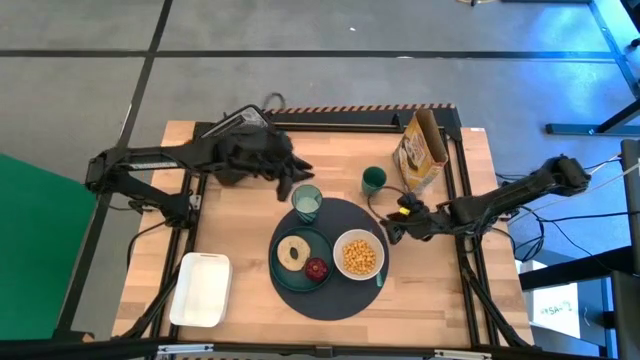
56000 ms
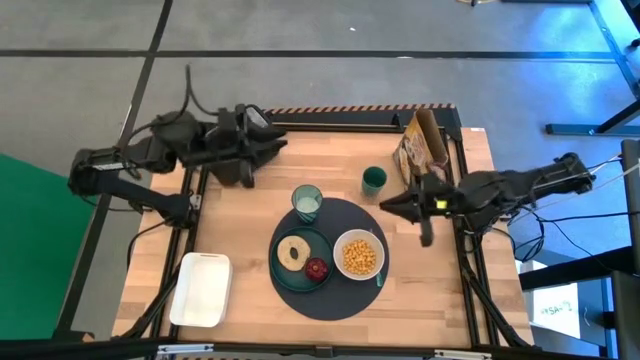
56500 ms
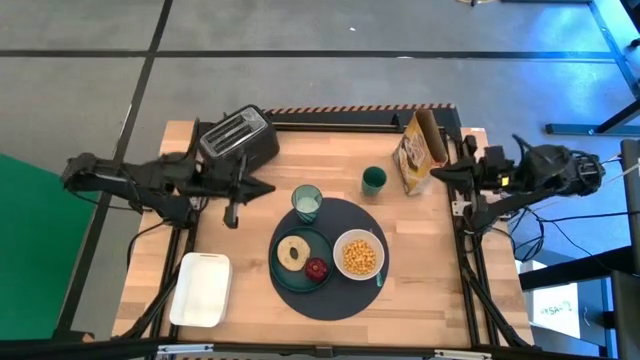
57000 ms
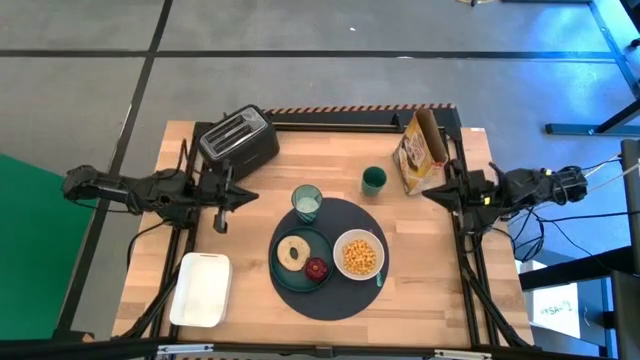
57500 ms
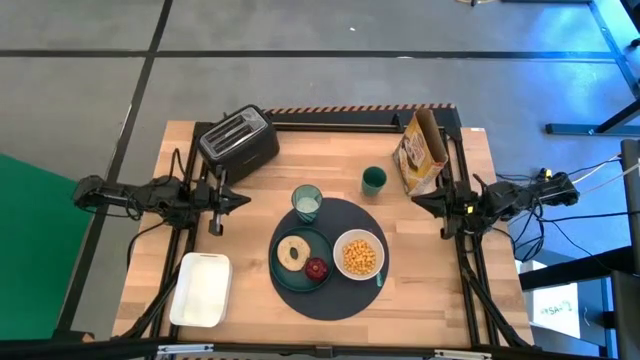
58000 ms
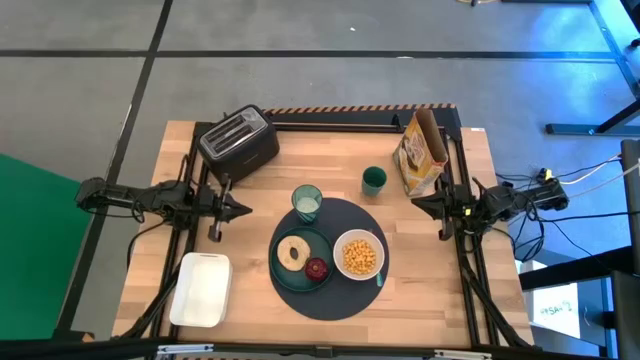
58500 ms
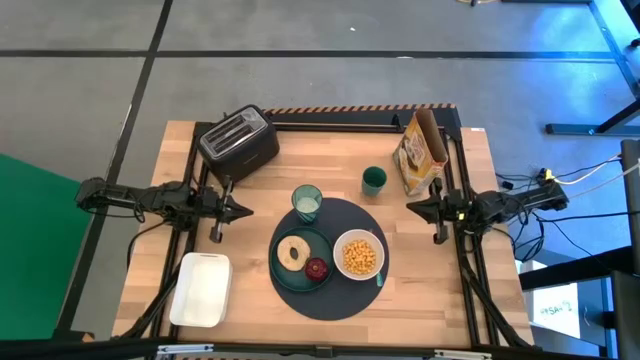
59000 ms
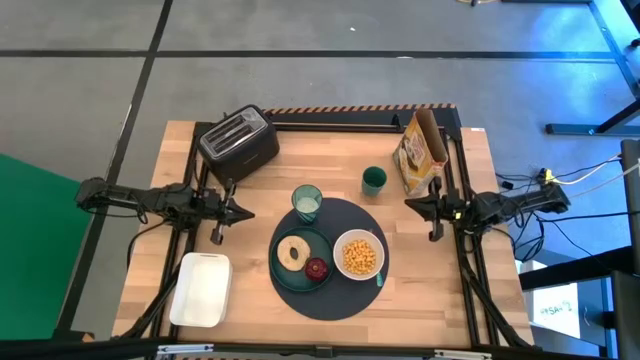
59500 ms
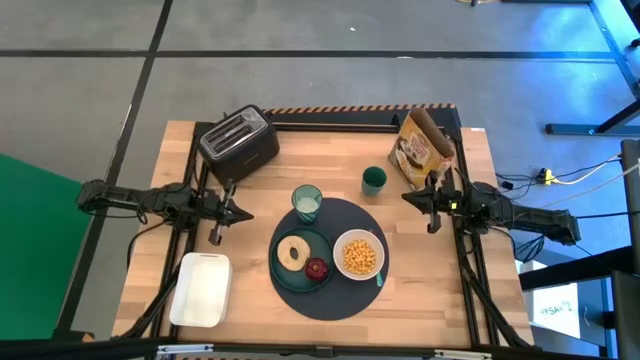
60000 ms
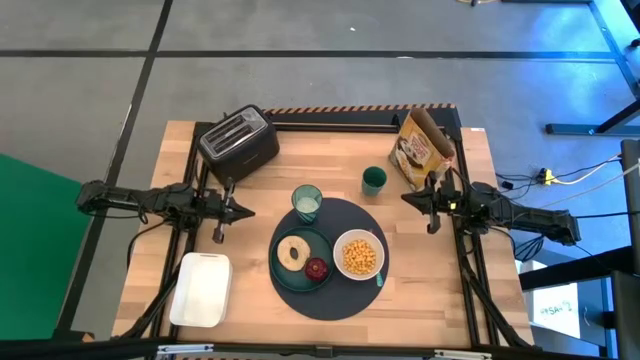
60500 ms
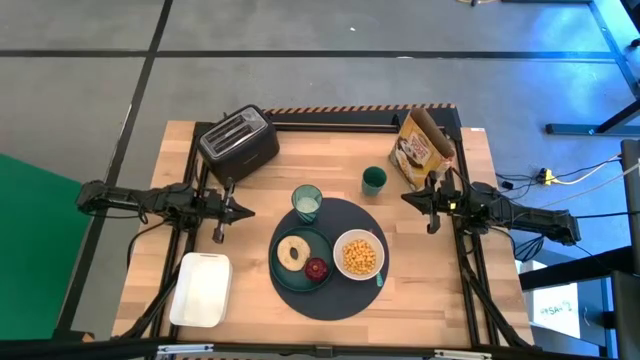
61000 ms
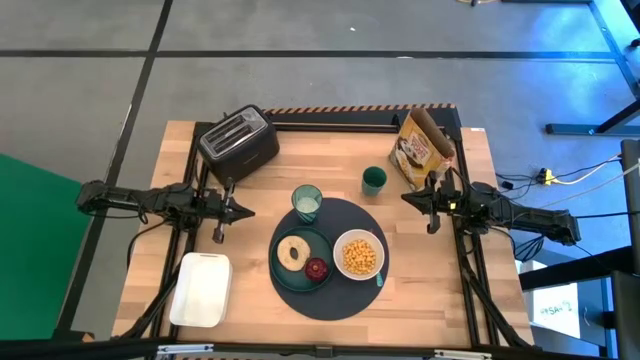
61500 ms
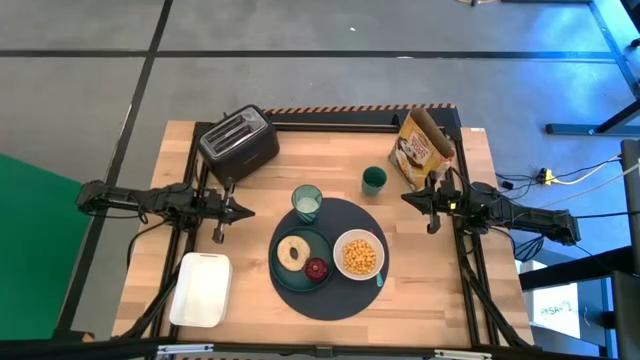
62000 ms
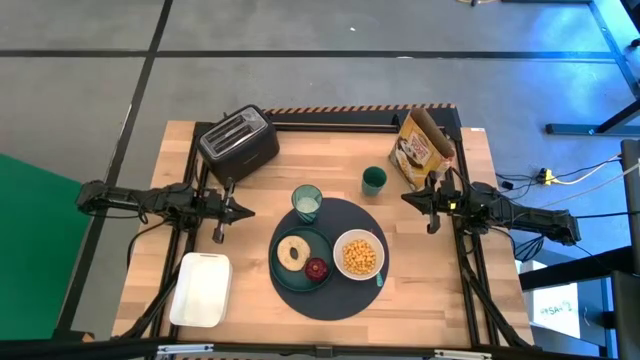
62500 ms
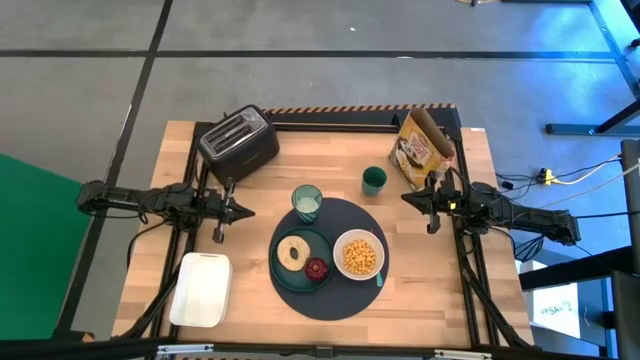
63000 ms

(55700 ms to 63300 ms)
Task: Arrange a breakfast setting
Return to Home Position

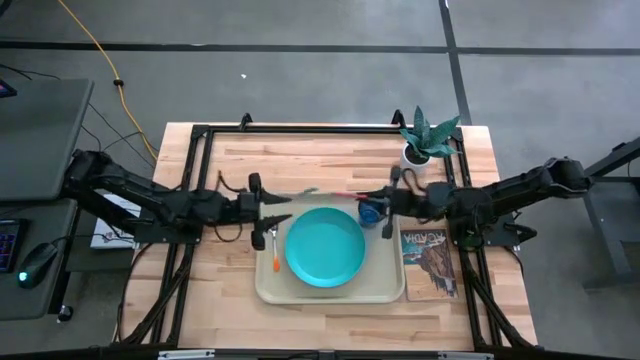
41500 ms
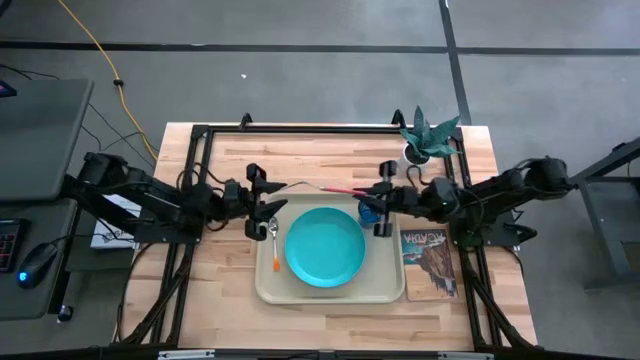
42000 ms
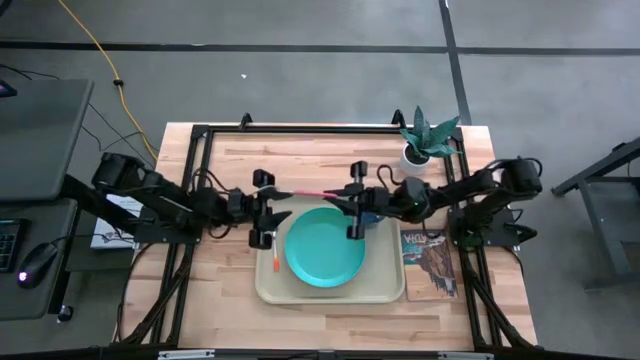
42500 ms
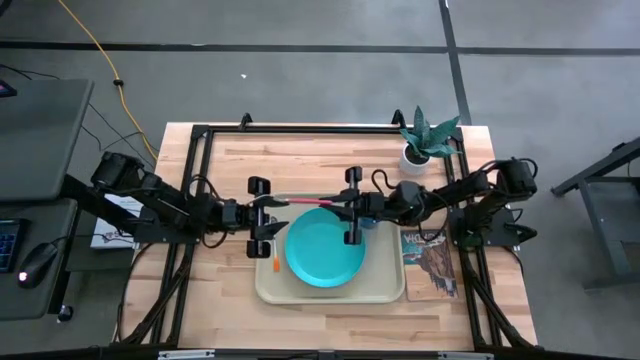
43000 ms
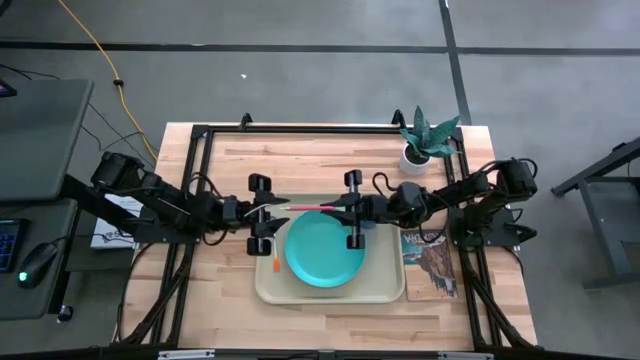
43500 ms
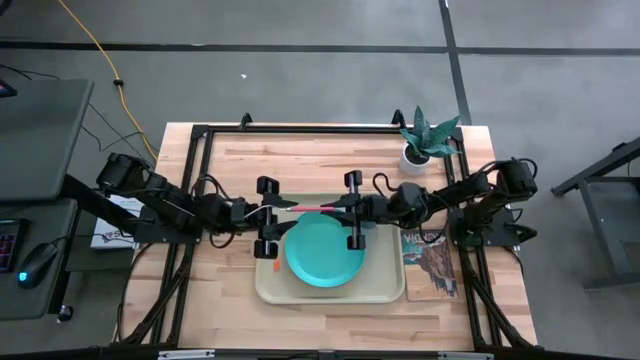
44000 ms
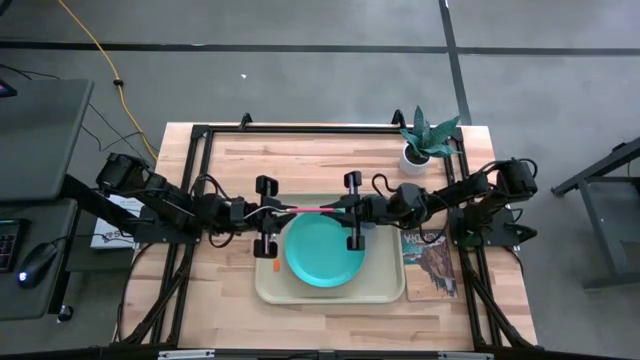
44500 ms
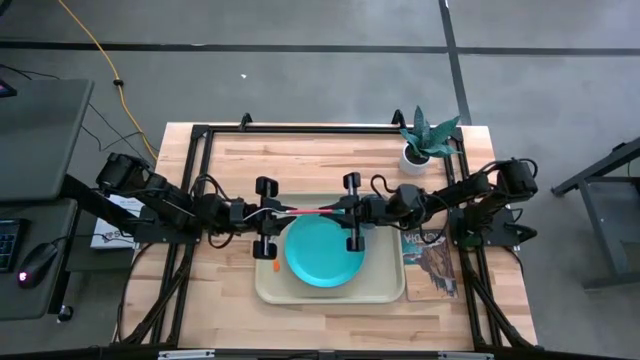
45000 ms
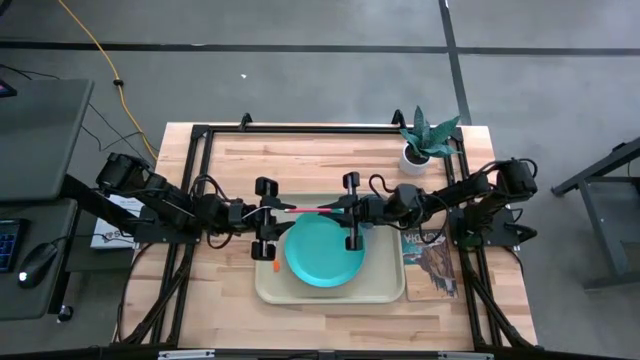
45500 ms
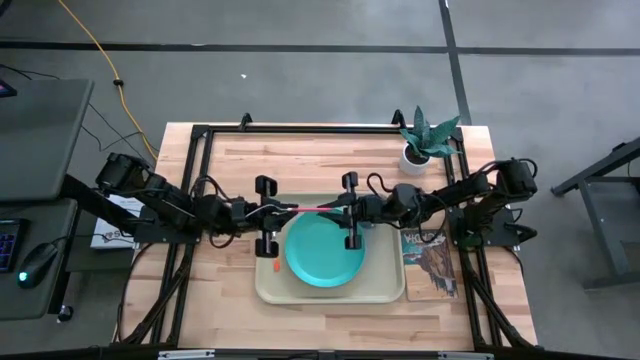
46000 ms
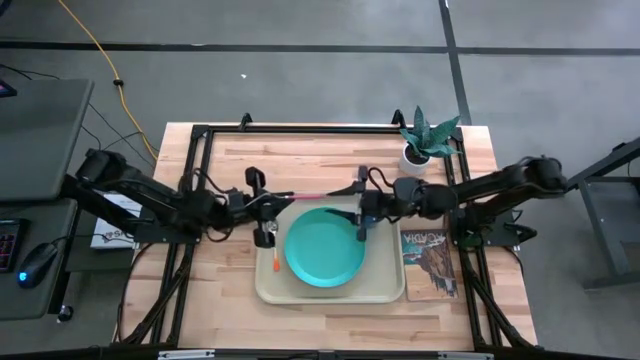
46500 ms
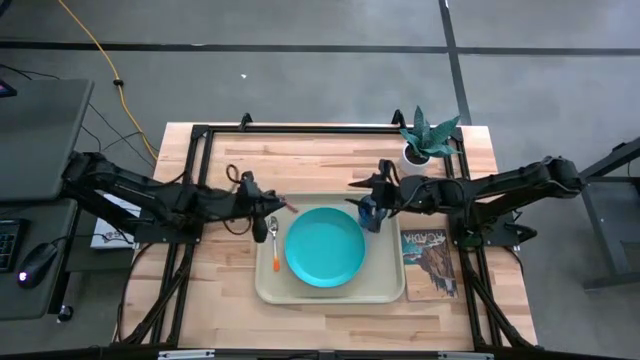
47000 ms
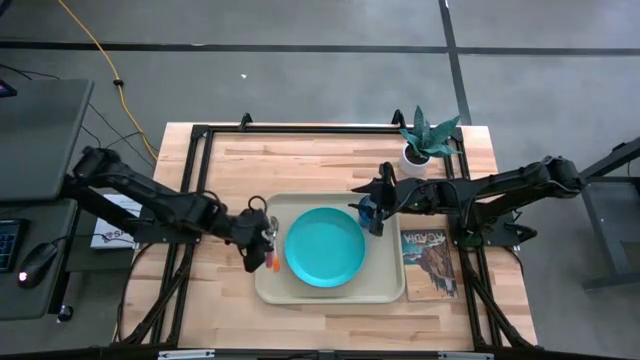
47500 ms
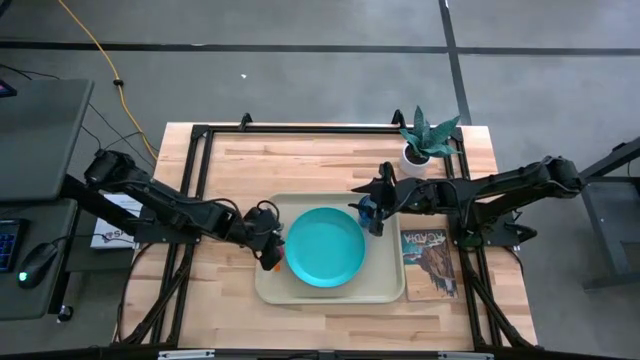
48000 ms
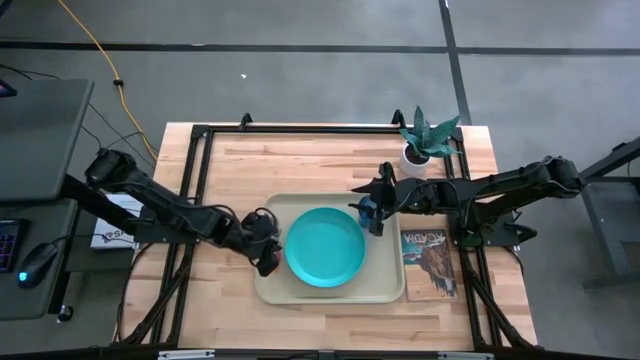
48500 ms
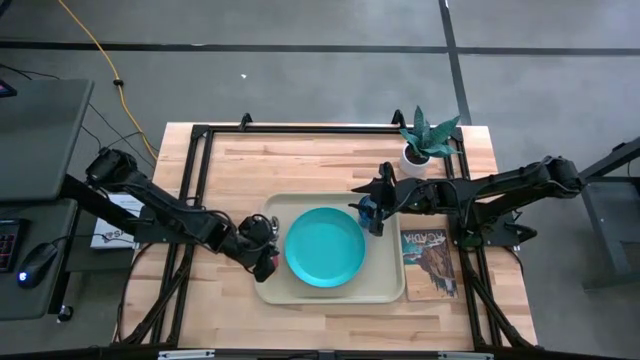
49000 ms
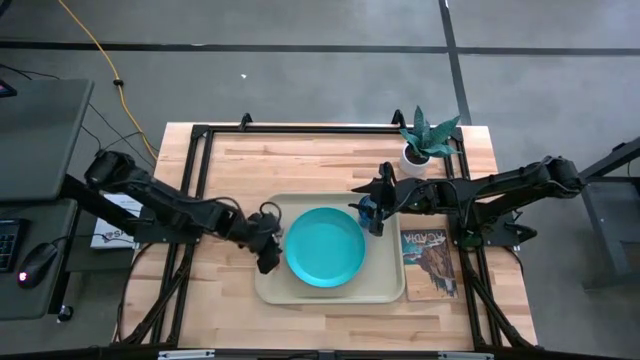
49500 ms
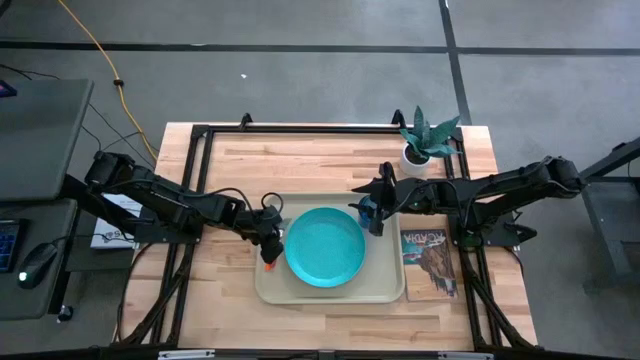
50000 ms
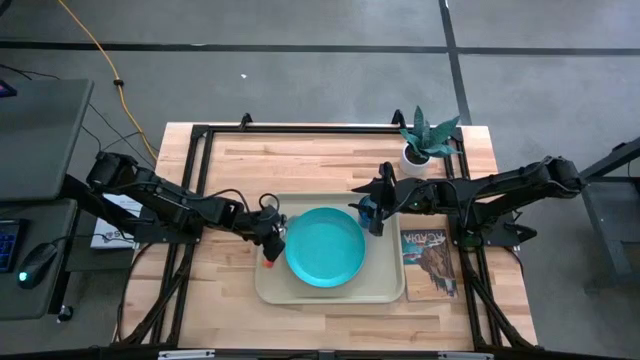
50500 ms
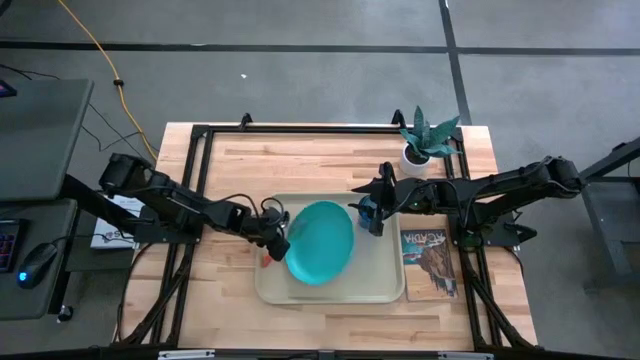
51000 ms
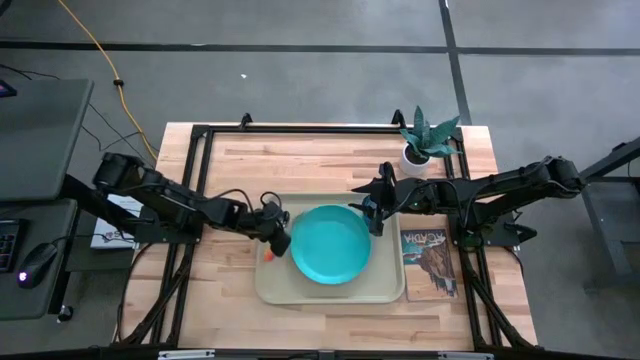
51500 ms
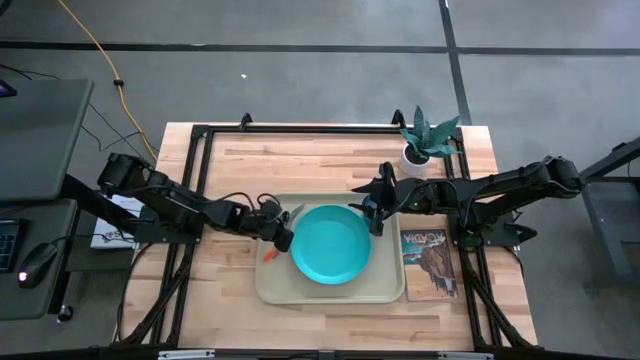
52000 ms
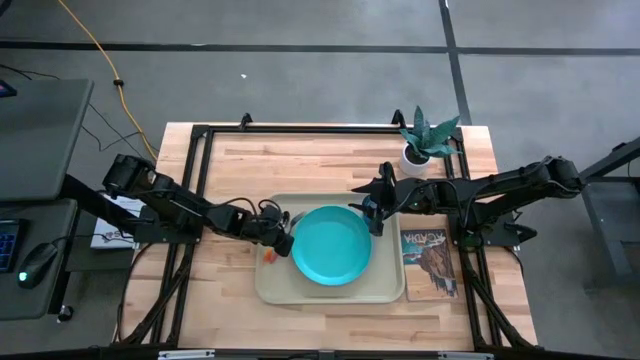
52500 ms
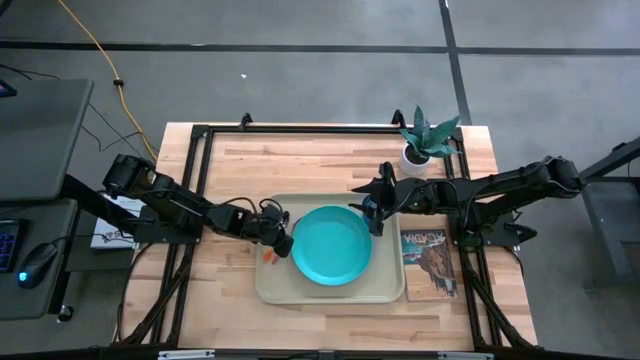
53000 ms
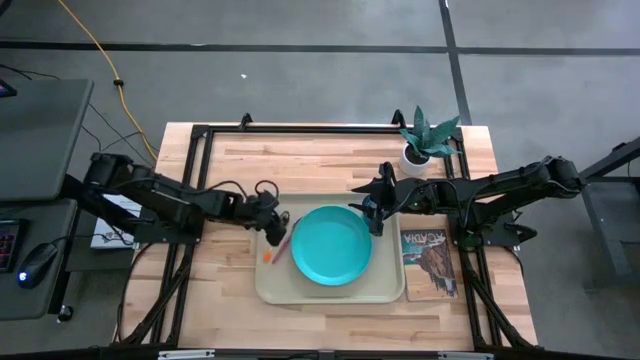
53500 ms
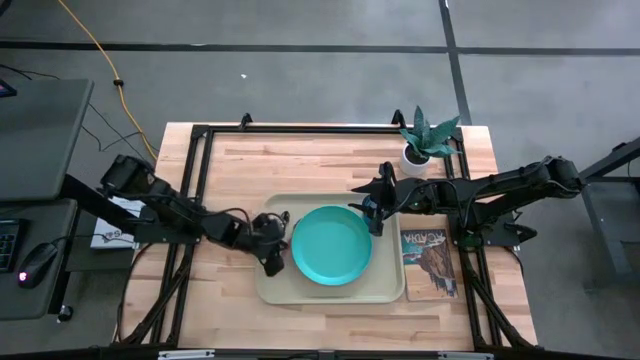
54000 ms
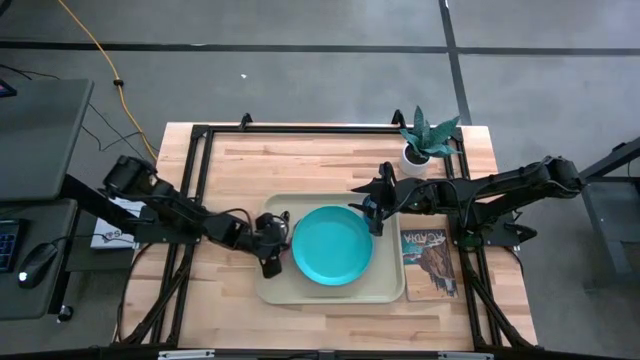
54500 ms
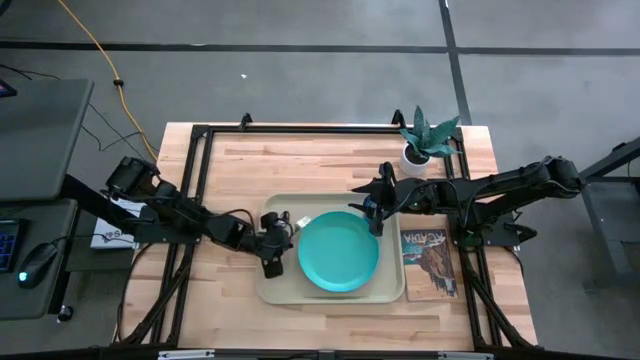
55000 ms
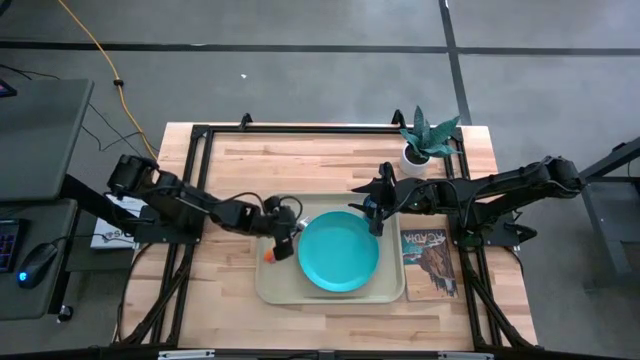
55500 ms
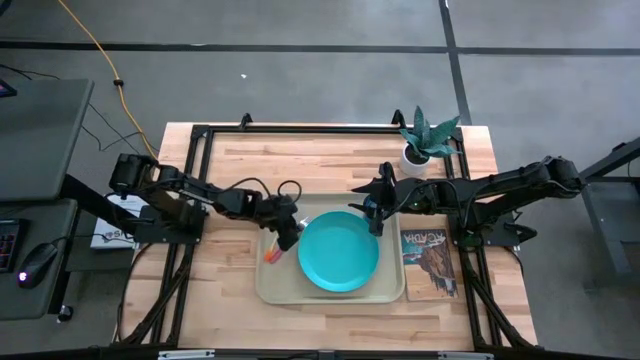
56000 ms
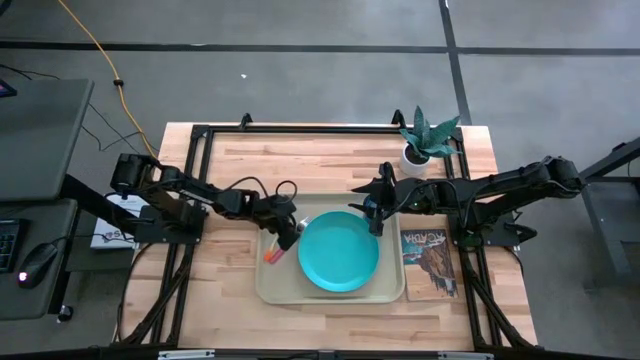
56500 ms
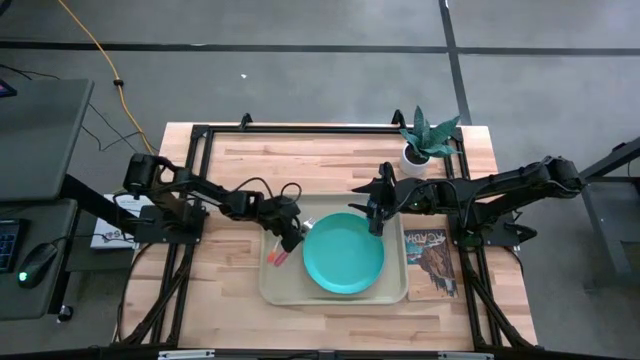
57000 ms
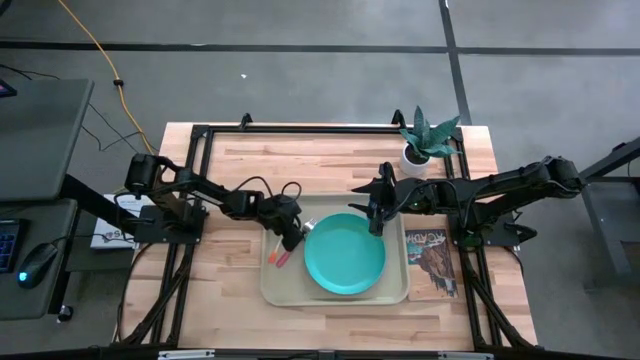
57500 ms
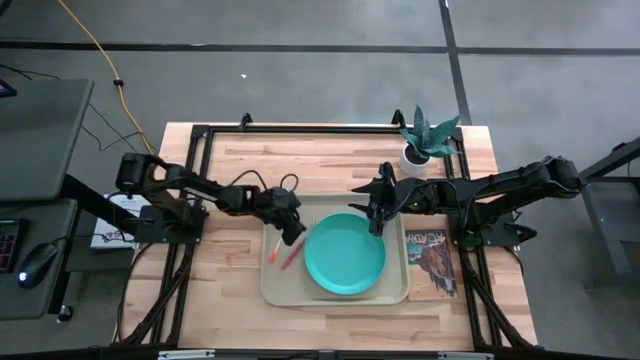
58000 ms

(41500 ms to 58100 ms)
Task: Pick and place plate/cup/fork/spoon on tray
Put the pink fork to the left of the blue plate on the gray serving tray
